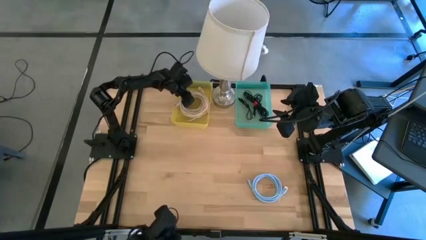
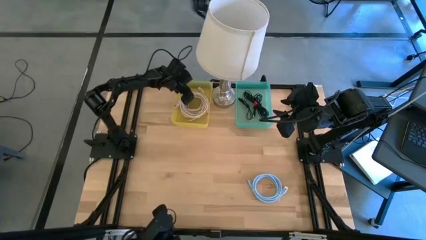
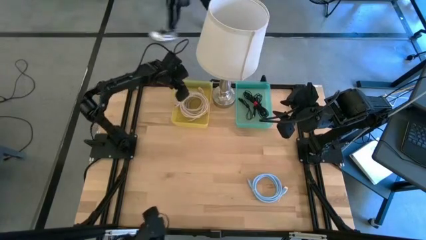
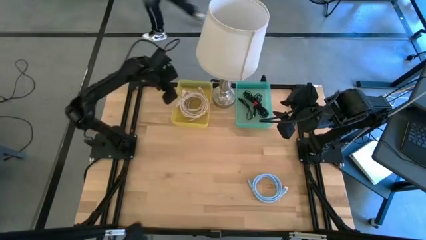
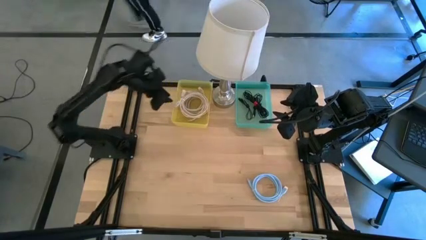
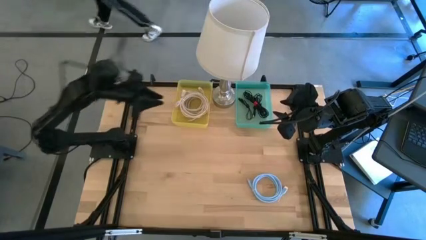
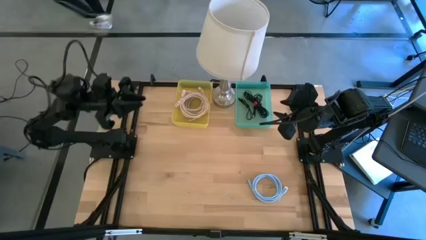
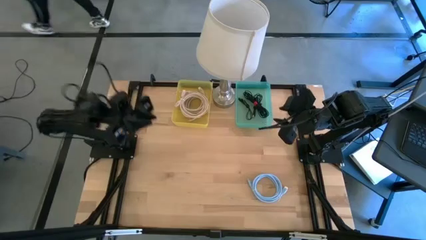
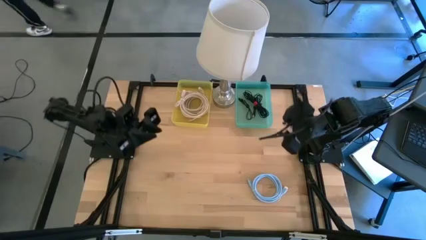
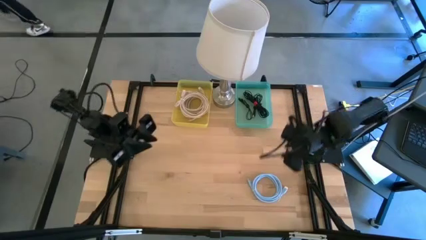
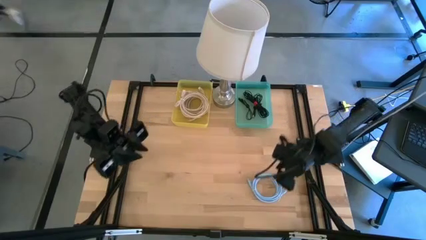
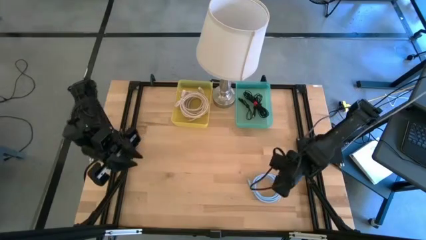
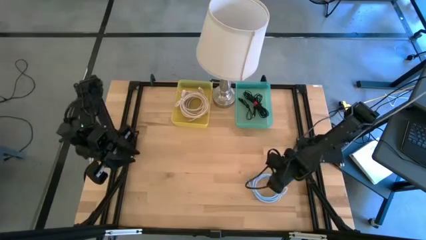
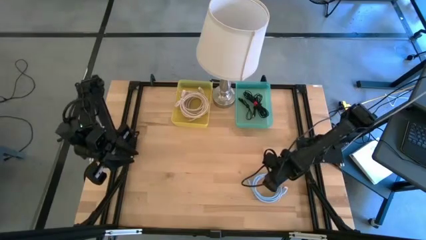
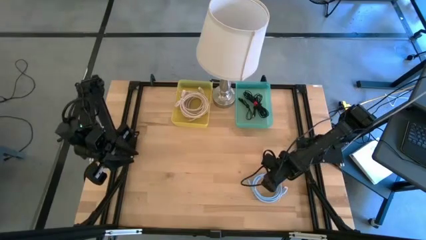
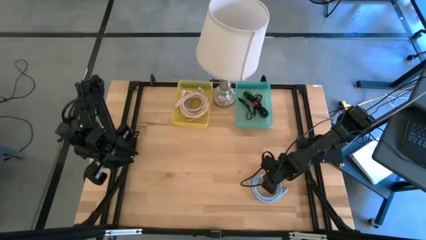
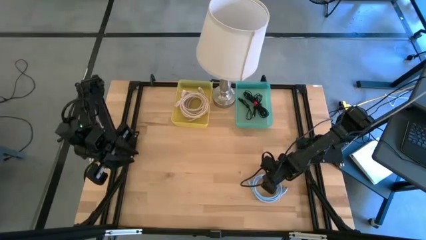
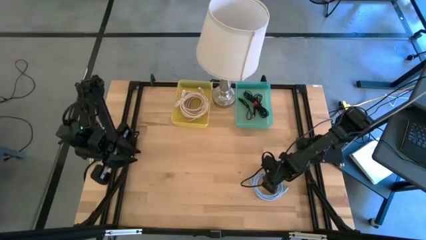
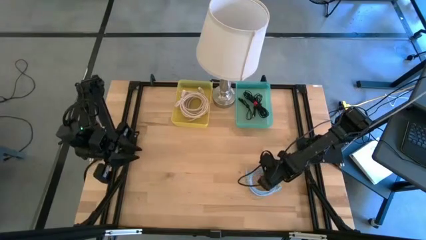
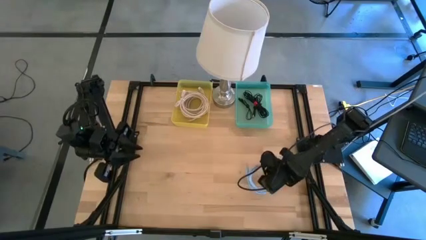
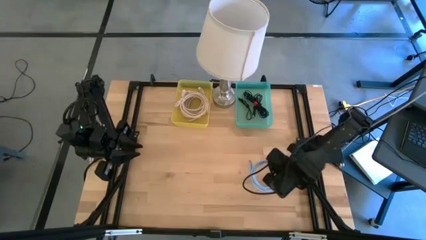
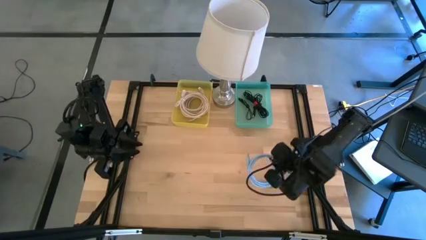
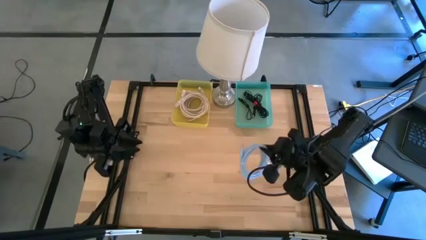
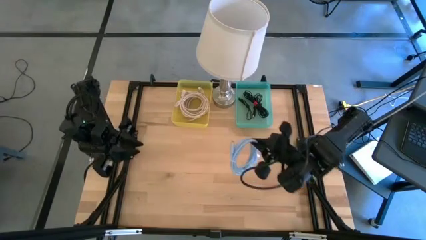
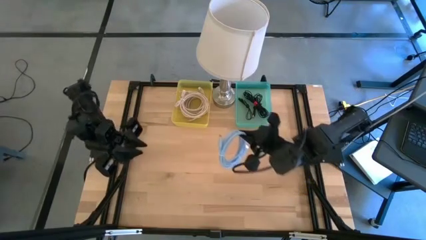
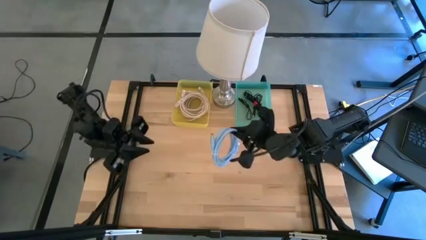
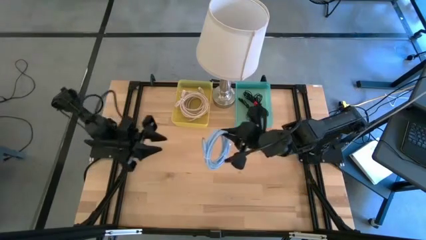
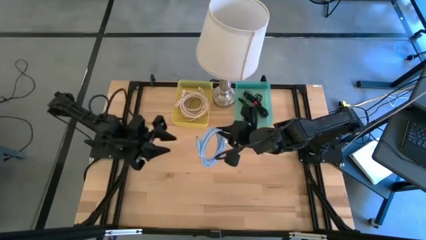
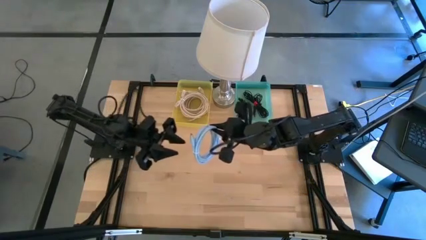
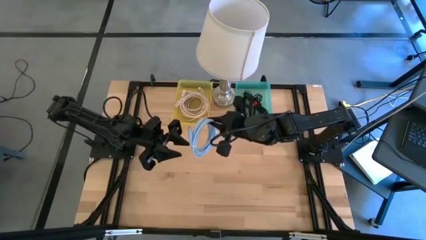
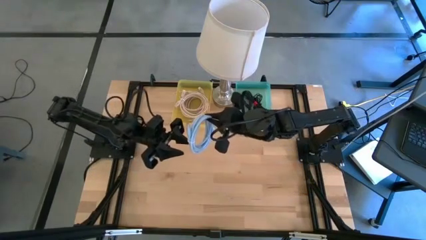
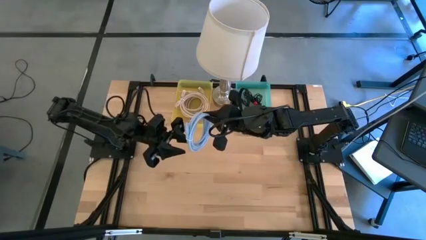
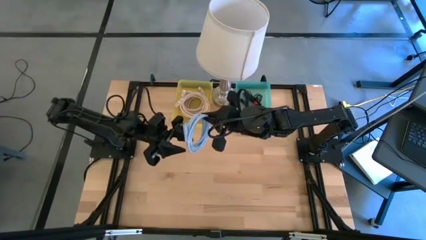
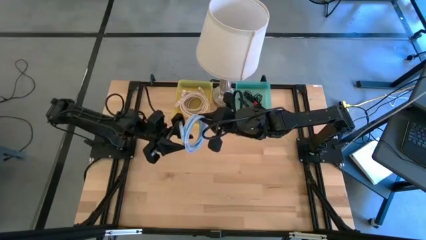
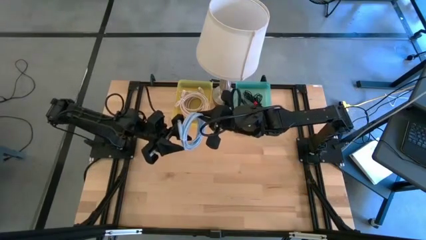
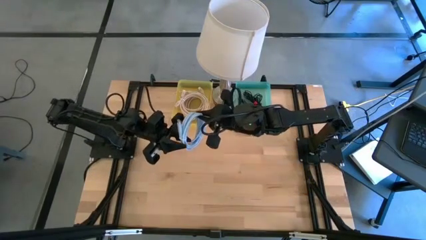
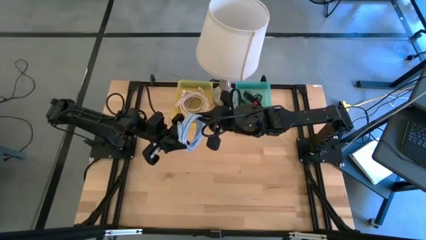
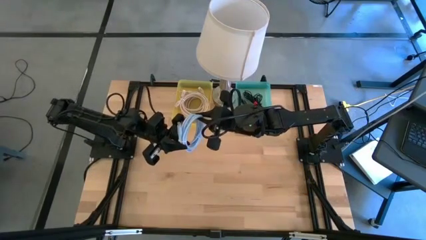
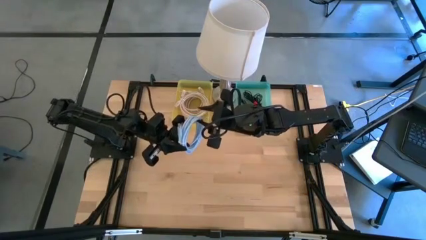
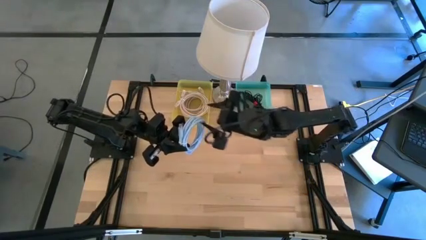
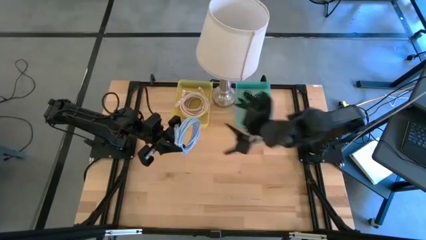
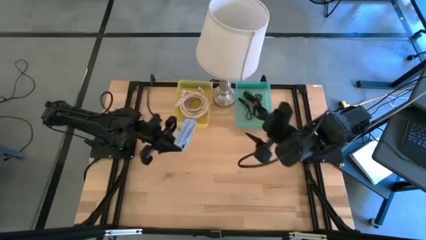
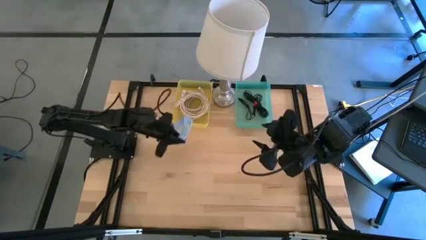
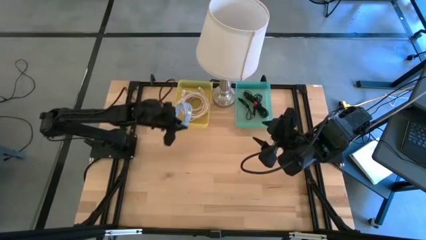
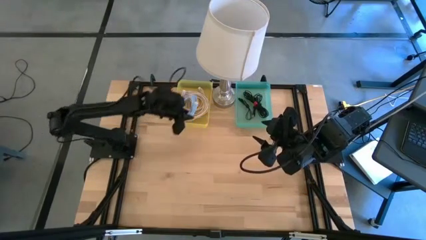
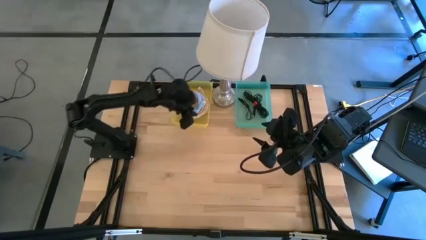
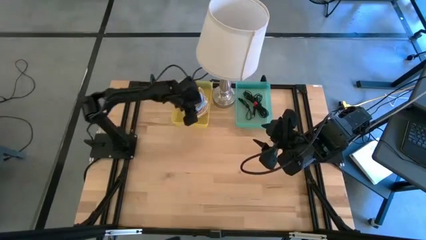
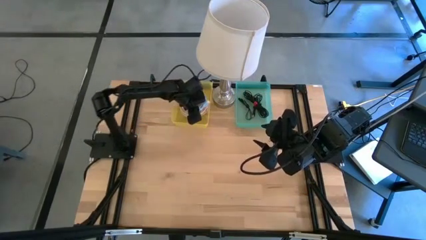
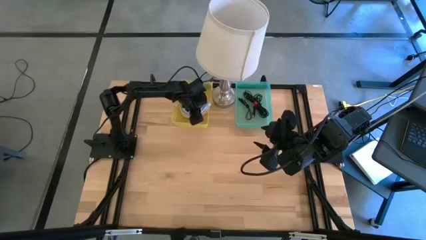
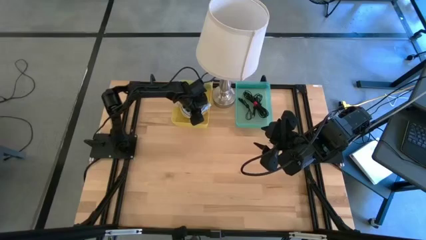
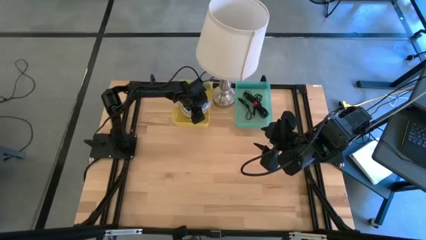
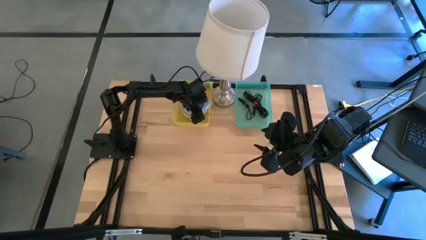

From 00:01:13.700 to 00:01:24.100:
Put the blue HDMI cable into the yellow bin

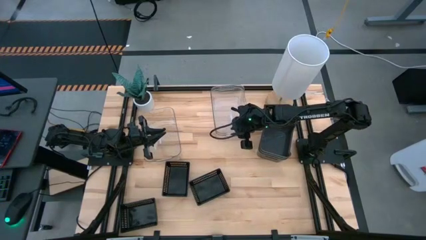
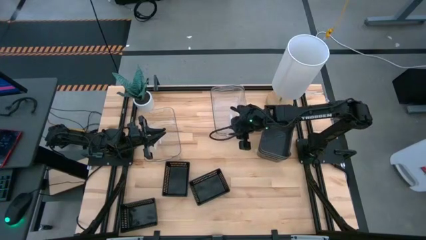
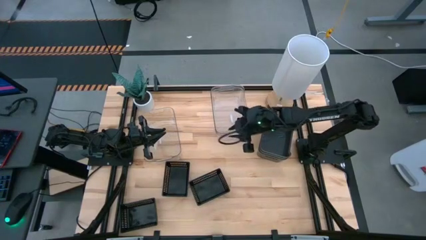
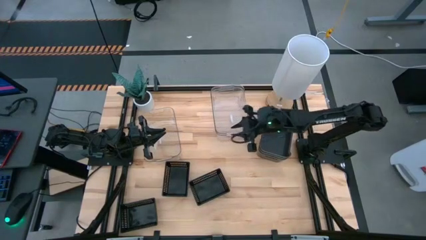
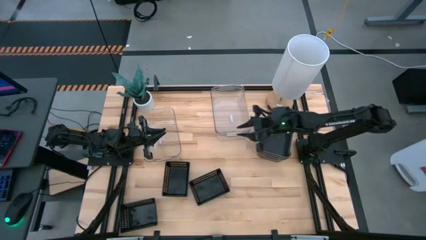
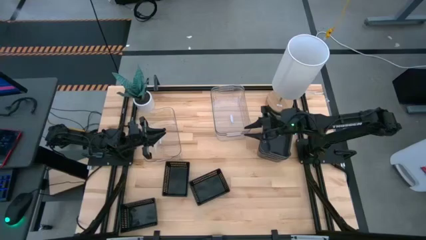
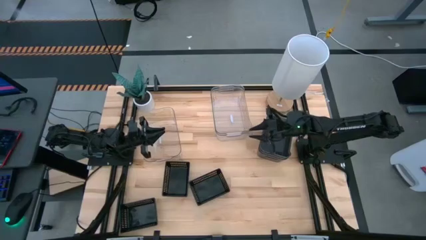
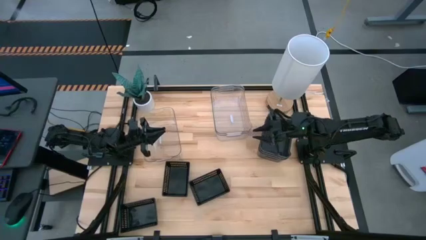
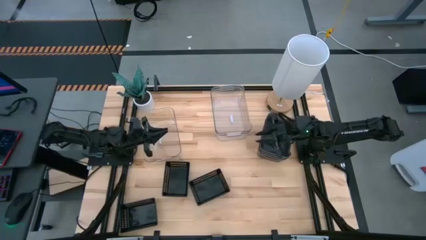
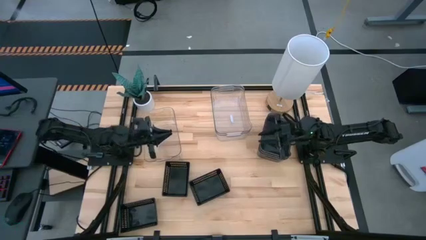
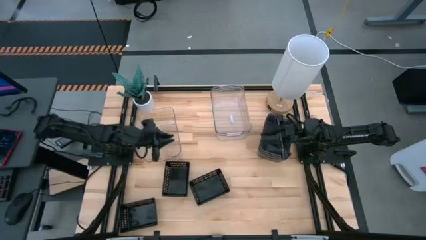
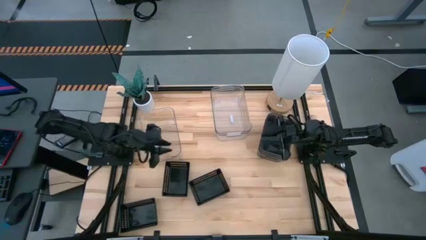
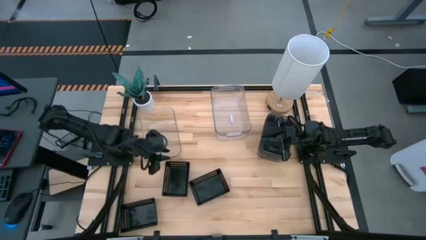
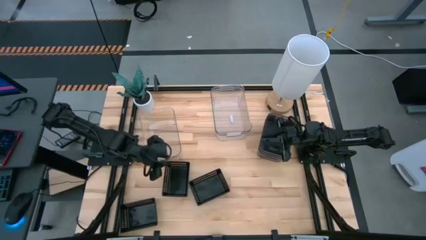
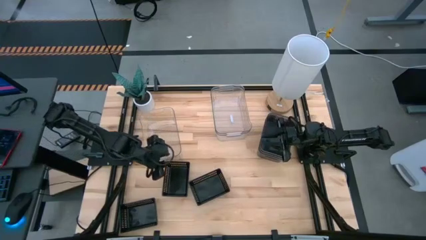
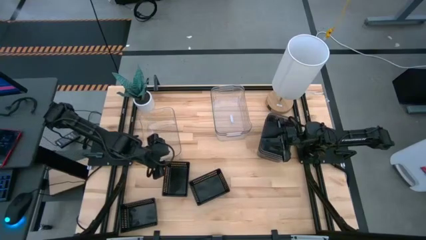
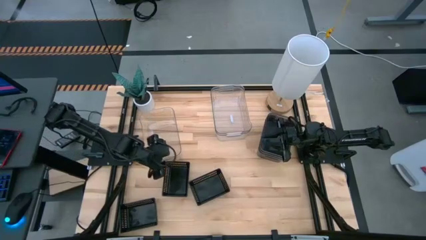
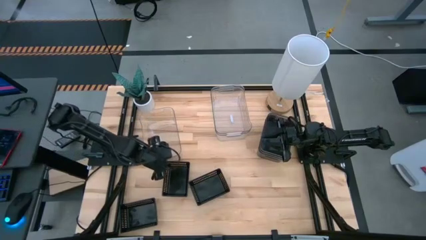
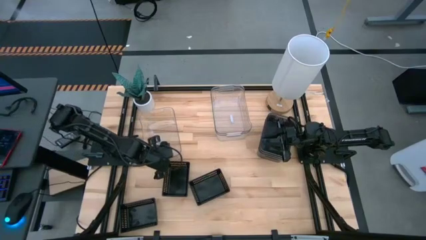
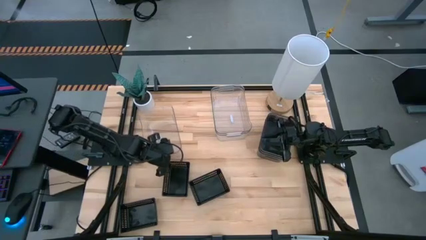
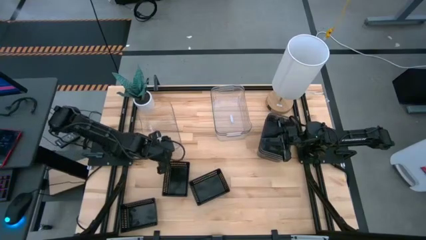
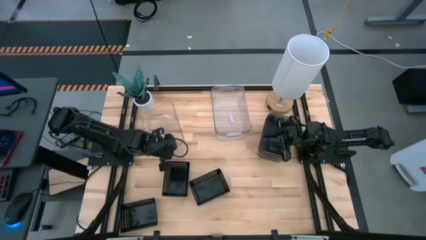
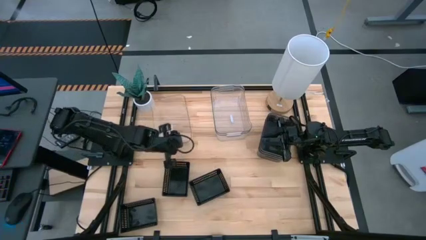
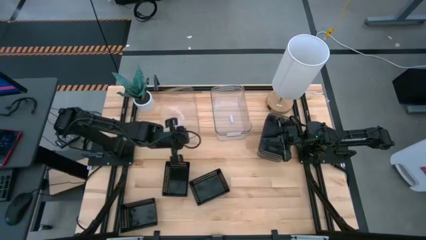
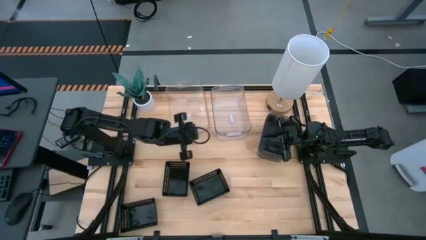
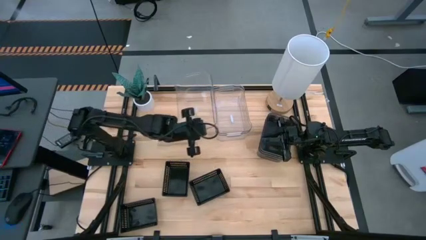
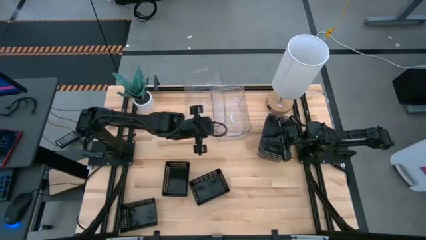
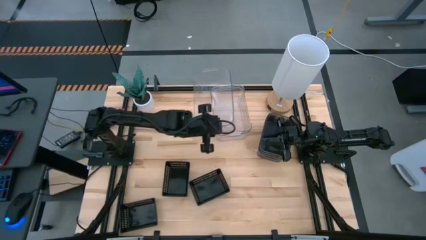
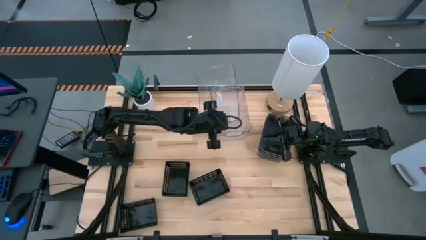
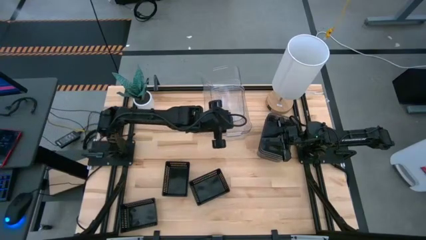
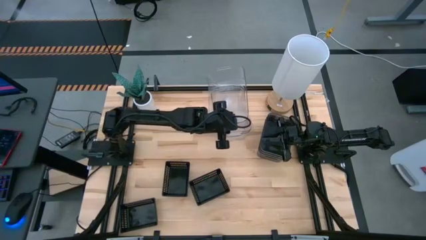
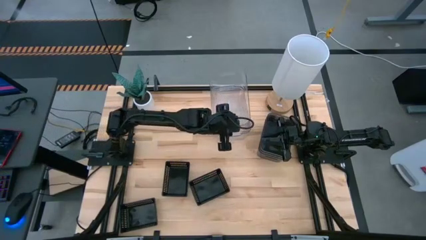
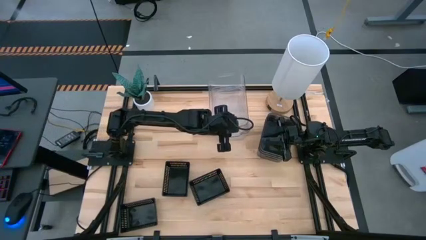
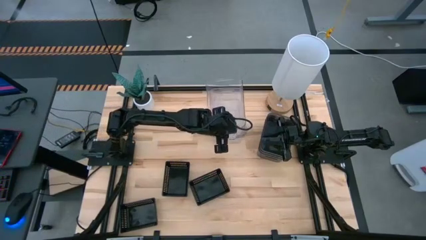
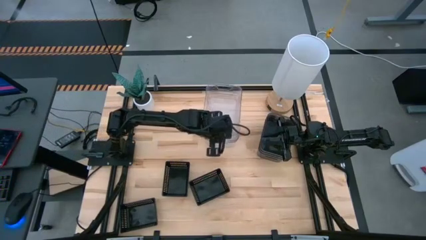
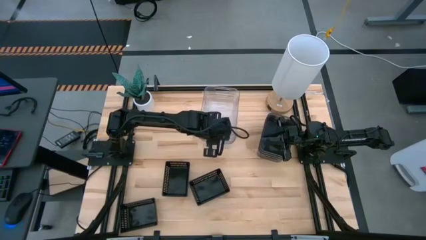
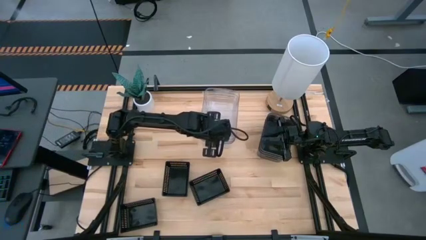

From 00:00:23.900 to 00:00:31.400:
Stack the left transparent bin on the transparent bins
